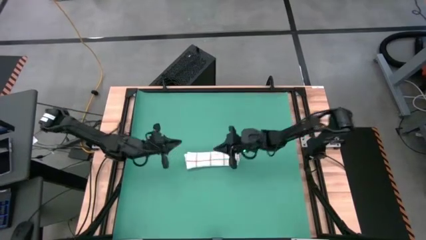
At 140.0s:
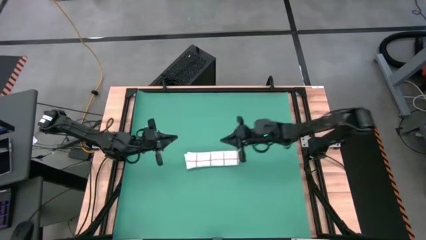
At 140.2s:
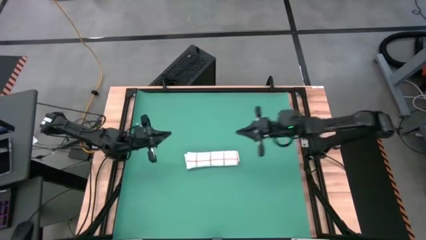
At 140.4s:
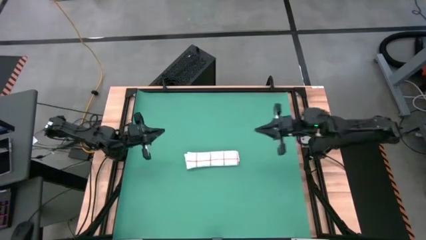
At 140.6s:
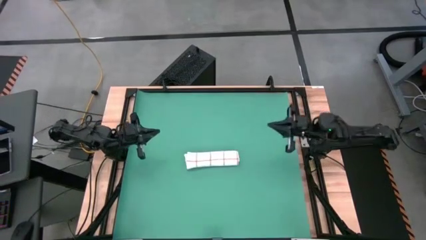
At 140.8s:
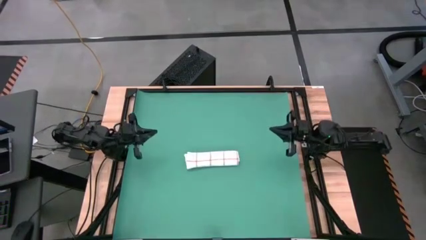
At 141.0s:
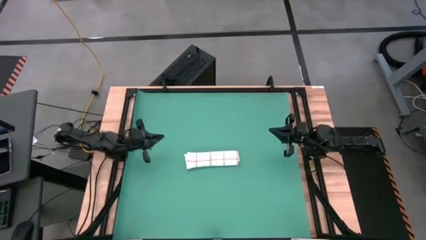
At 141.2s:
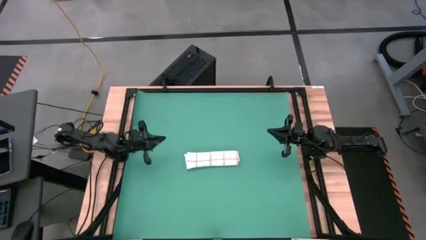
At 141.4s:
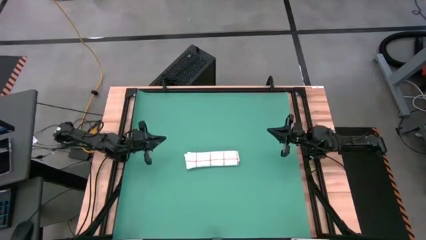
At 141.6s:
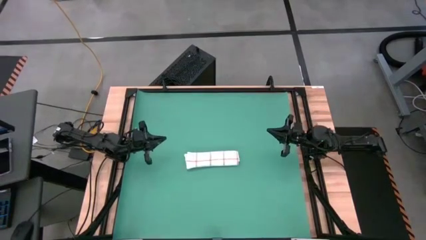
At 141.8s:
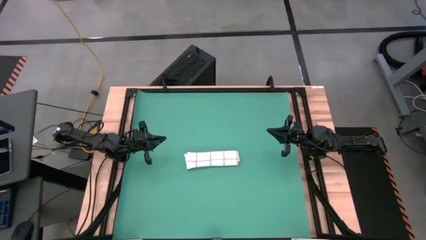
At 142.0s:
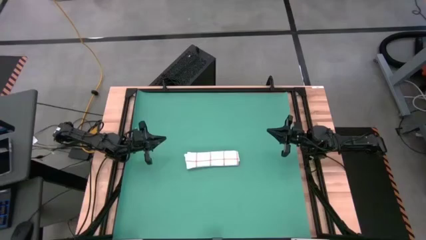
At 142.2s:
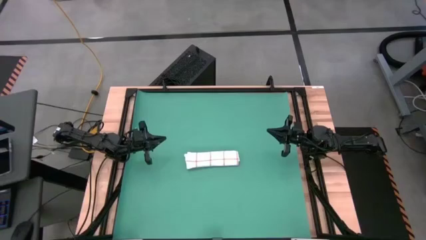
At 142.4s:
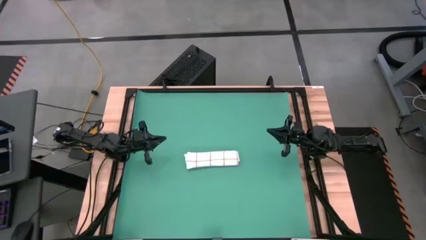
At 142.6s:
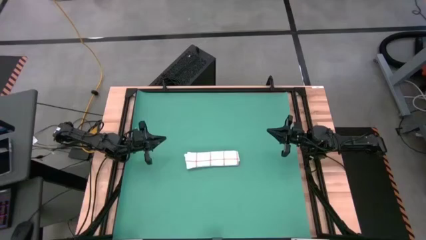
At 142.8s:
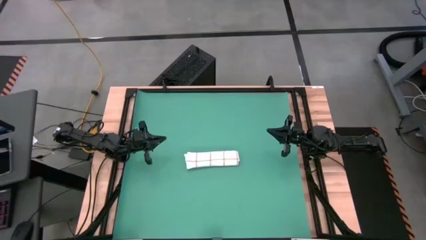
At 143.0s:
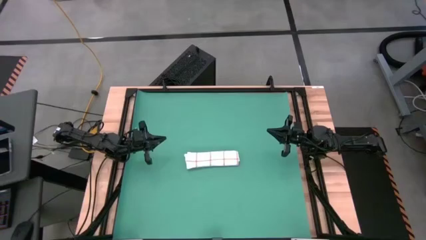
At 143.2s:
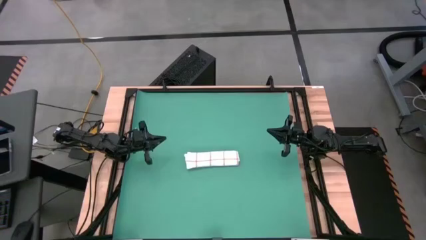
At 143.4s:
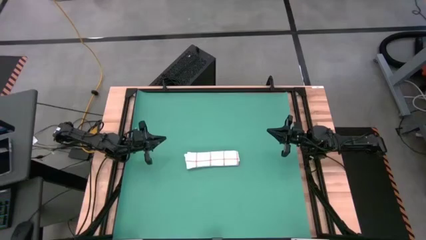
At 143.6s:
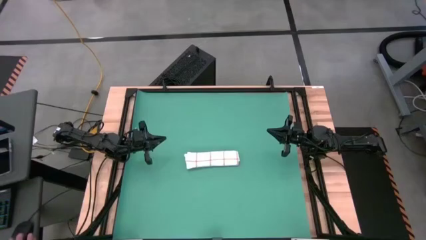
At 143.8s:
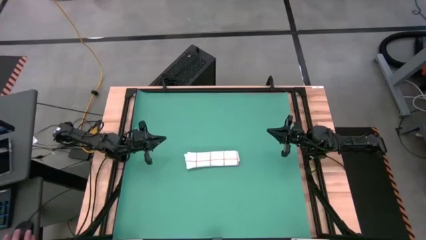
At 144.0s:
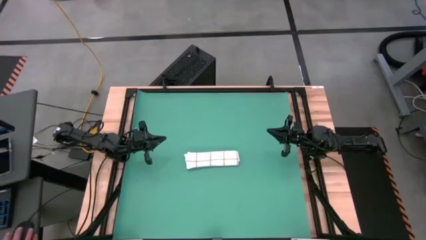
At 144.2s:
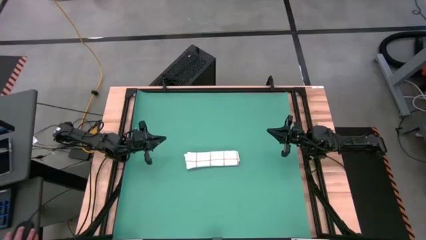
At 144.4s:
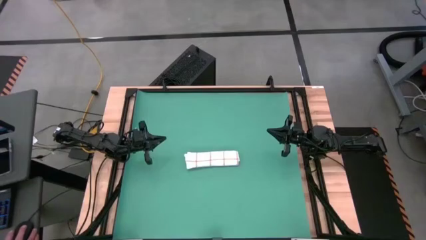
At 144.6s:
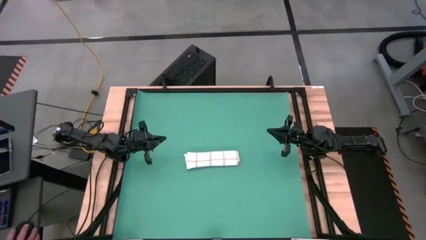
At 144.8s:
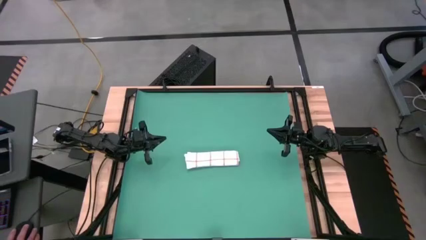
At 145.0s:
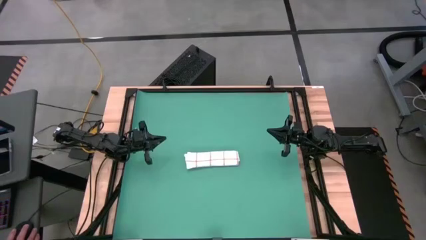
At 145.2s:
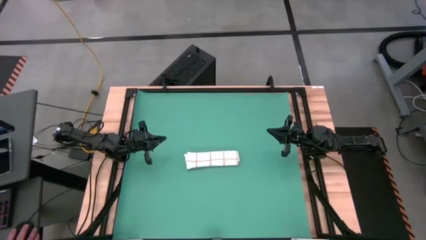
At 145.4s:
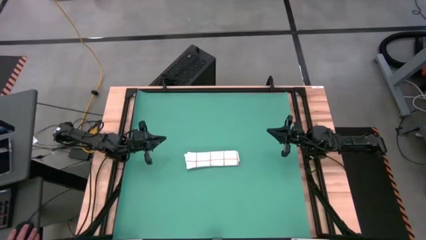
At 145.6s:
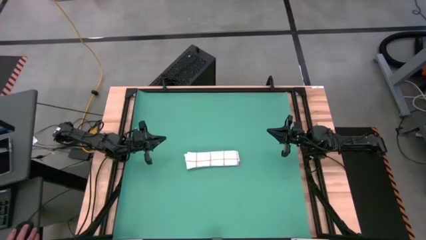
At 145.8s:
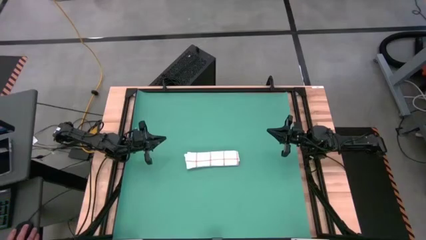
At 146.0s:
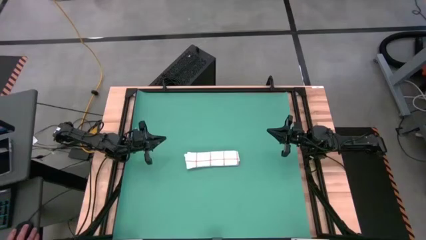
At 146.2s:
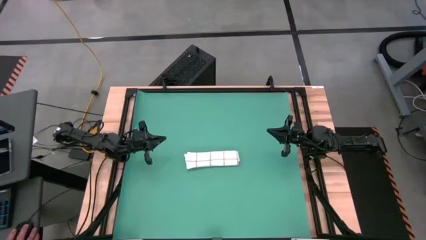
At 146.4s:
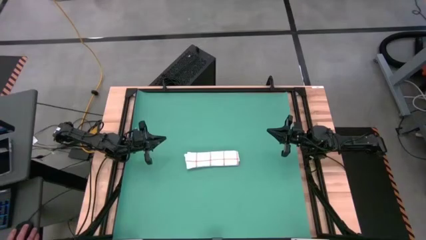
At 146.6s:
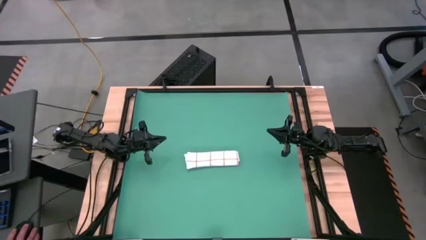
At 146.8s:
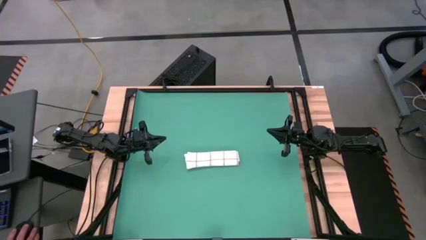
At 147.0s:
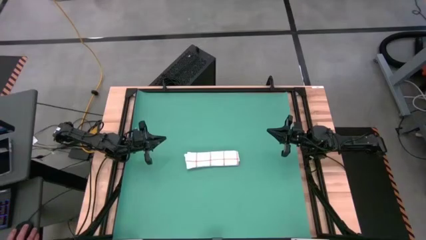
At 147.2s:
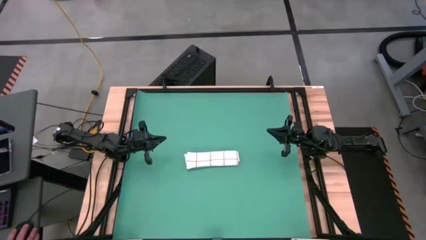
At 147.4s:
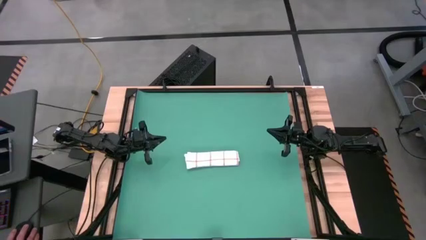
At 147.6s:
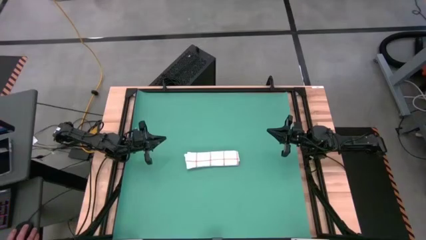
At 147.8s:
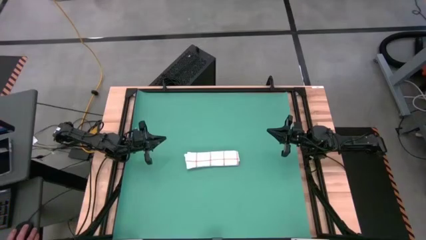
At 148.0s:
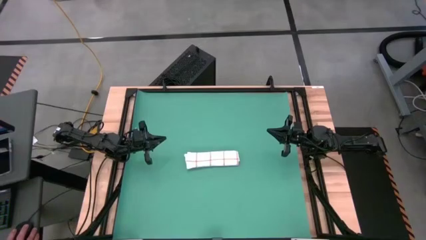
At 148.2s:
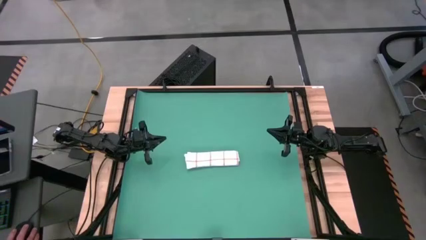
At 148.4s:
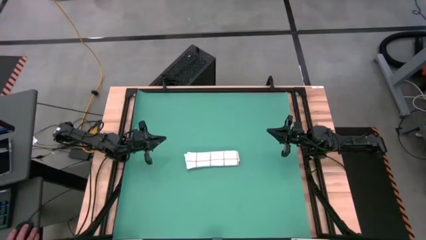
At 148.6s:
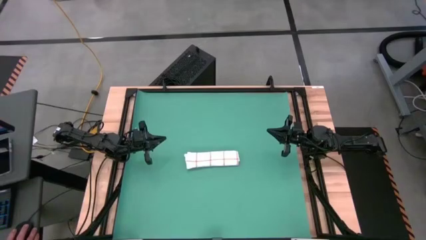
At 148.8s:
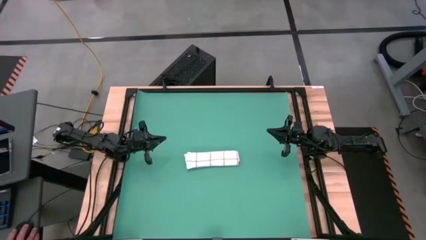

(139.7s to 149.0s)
Task: Roll towel
Return to Home Position

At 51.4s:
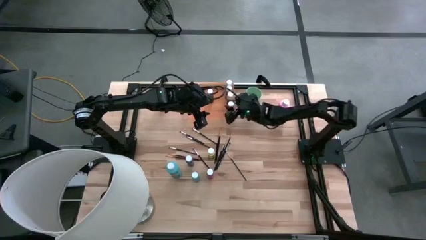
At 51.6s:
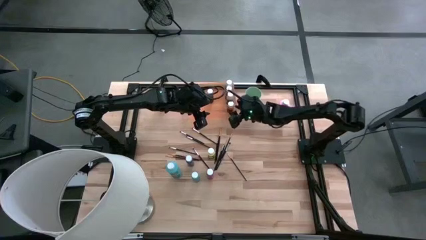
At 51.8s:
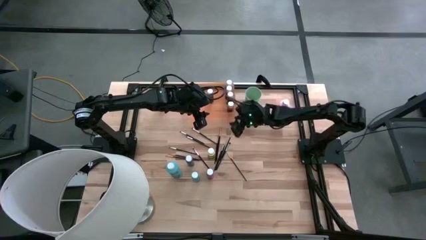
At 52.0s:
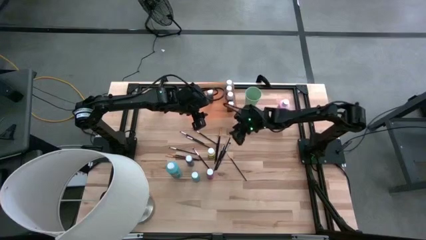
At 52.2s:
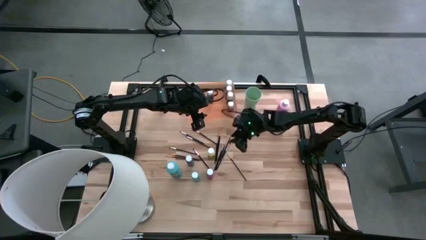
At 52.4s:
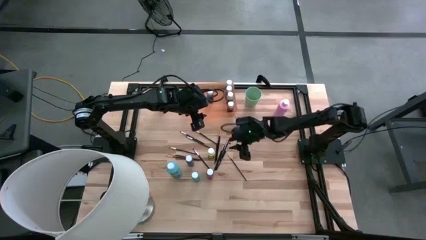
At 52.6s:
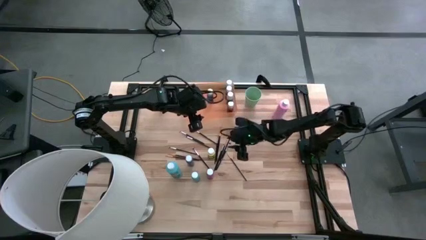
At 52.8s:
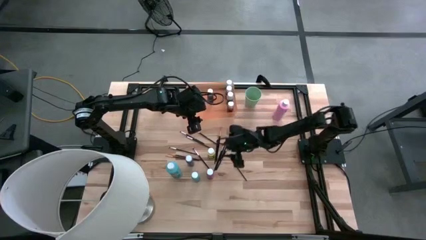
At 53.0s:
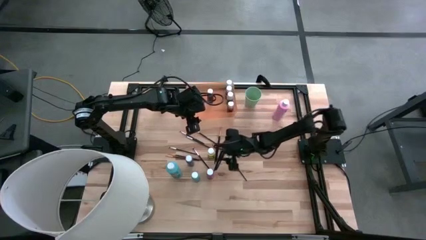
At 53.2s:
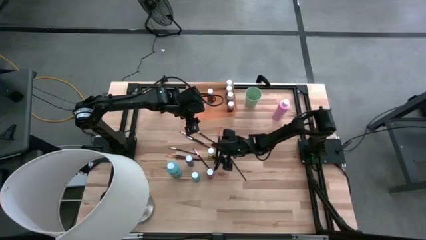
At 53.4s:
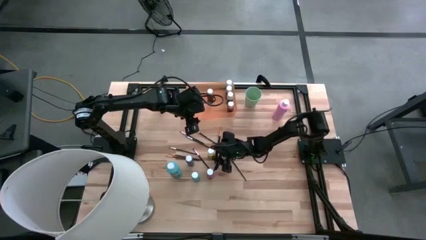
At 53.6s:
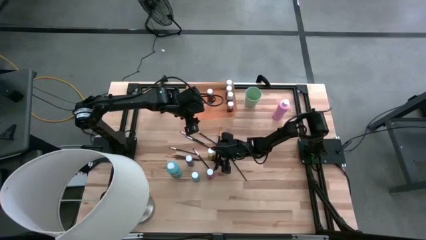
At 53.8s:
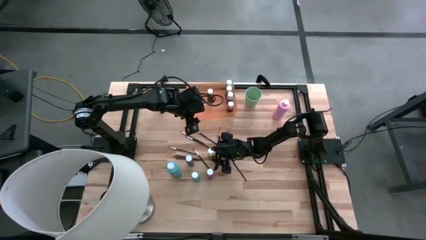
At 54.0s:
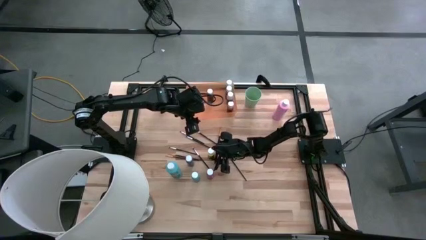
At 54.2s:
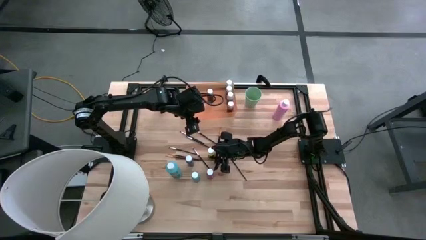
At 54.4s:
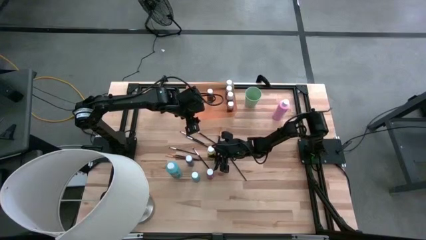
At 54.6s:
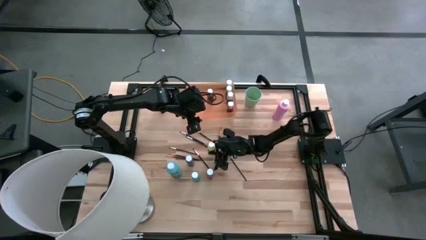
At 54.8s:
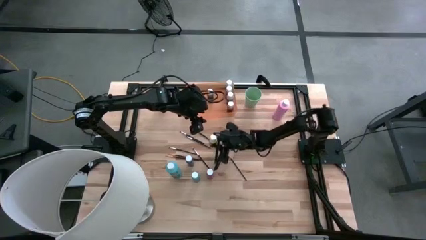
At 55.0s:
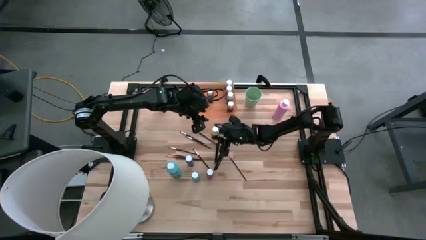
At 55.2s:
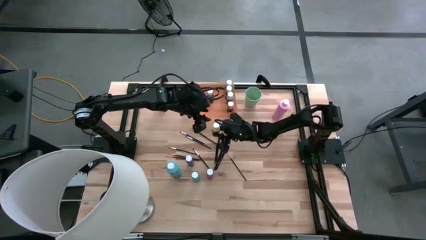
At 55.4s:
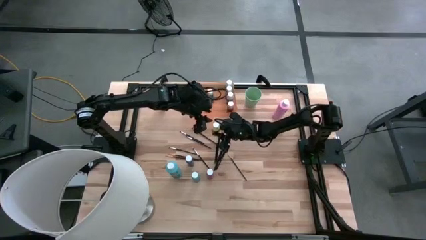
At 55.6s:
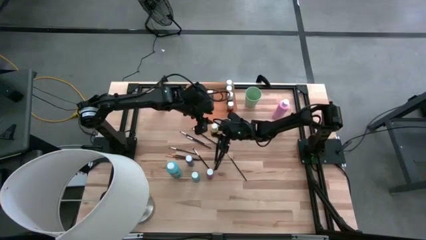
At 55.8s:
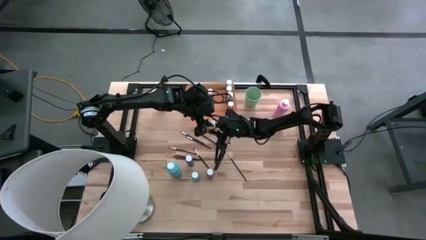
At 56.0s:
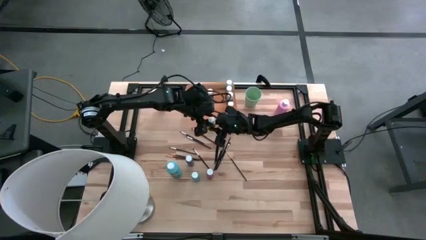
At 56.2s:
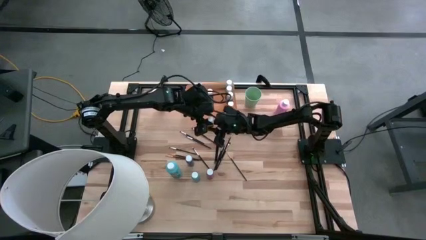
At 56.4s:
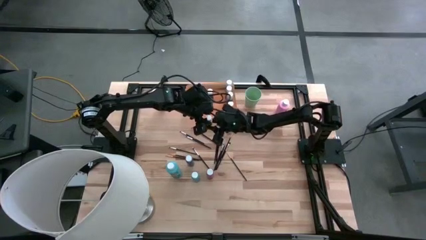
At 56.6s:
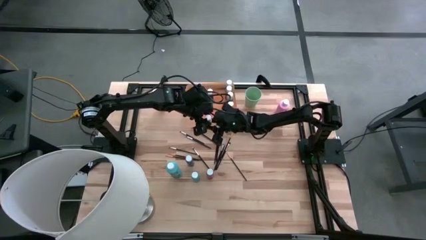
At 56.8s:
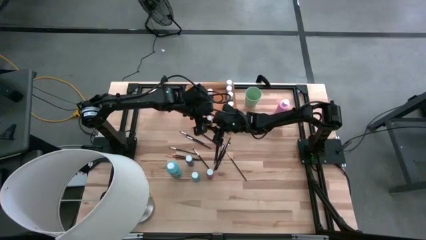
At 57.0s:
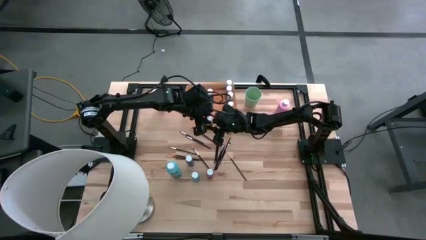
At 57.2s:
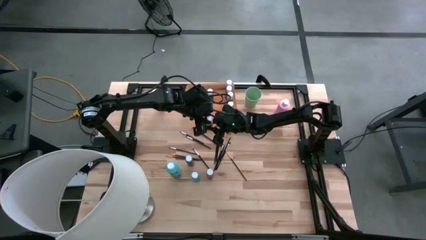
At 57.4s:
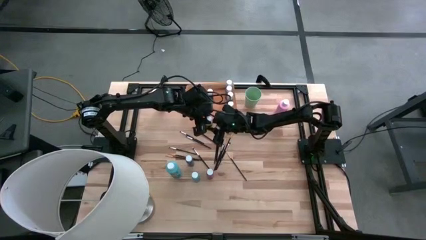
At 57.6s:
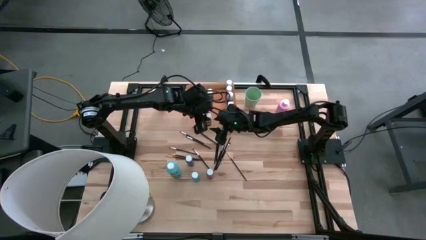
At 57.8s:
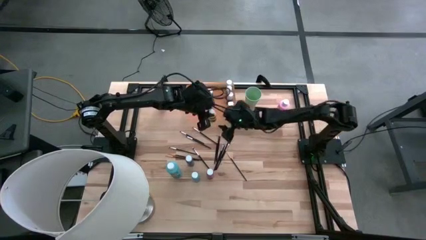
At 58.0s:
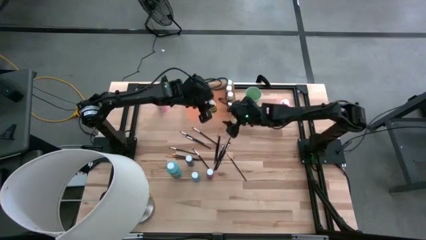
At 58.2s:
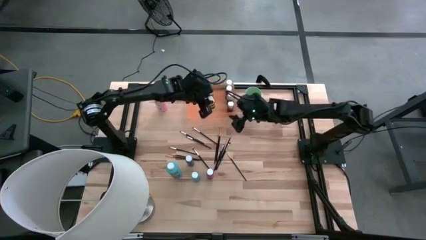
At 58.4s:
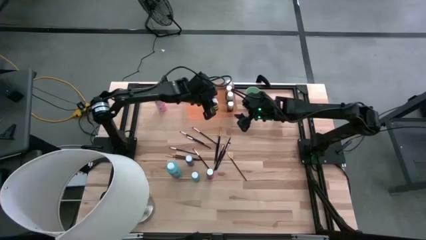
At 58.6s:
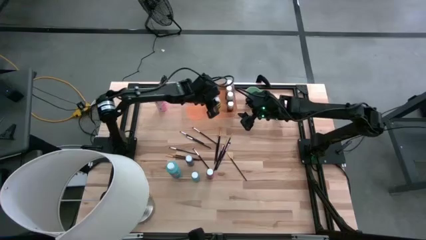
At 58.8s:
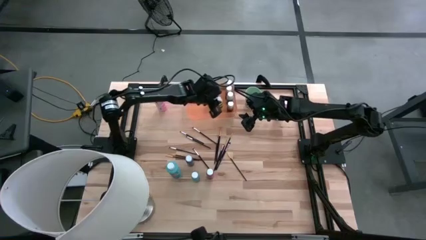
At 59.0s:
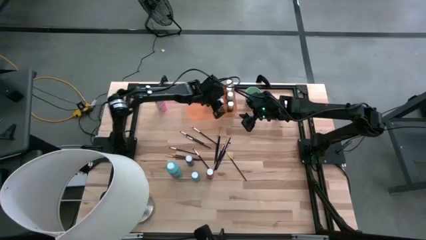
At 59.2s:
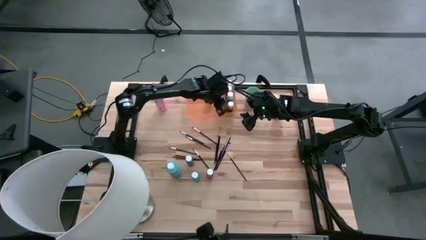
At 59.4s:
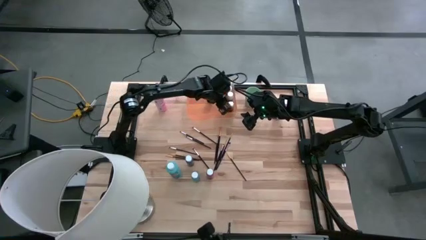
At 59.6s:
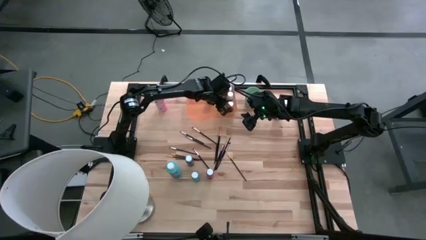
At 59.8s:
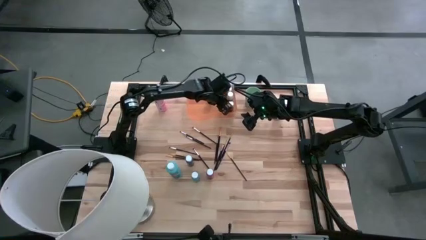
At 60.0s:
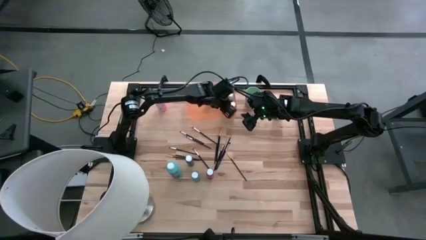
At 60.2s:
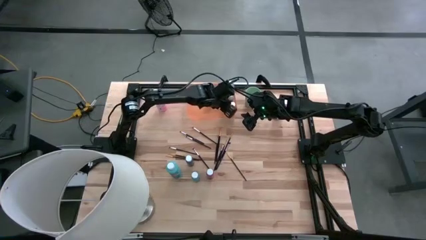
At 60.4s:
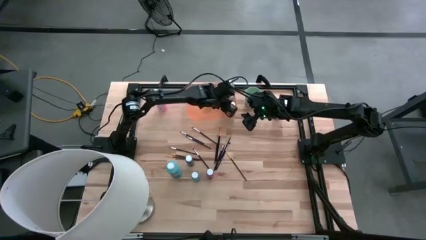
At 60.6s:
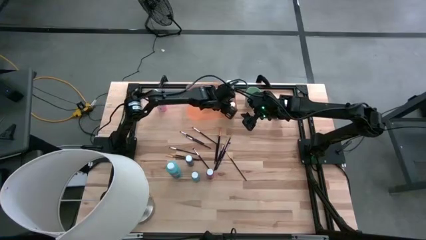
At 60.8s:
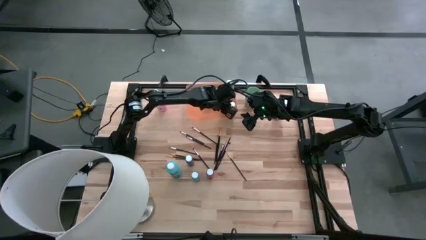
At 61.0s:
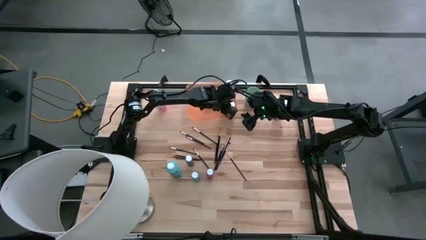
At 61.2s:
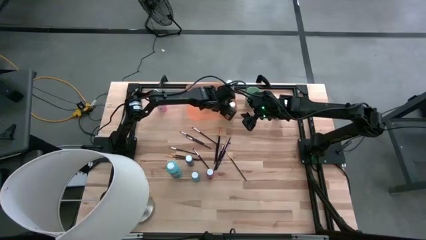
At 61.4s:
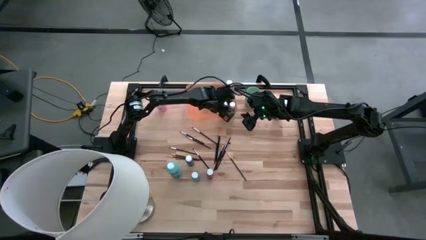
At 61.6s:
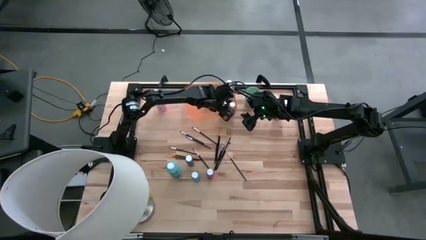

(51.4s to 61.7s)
Task: Pick & Place Paint Supplies
Put the small yellow paint bottle into the orange bin
